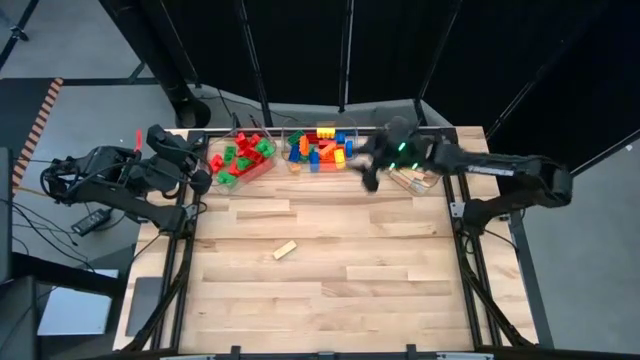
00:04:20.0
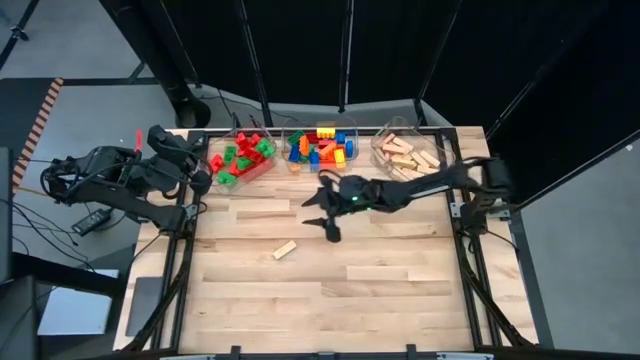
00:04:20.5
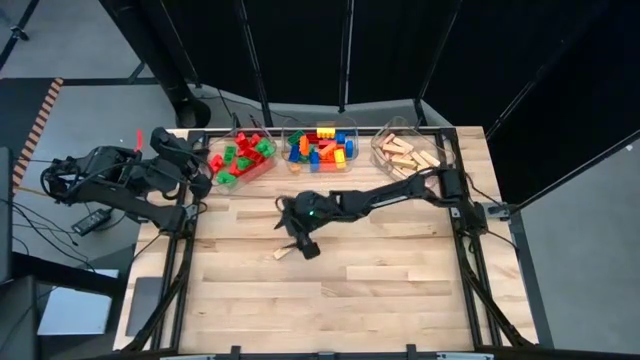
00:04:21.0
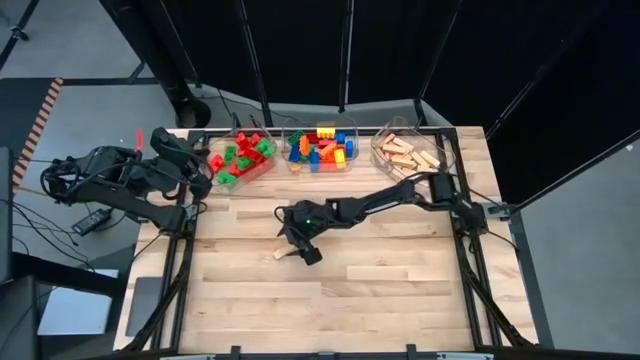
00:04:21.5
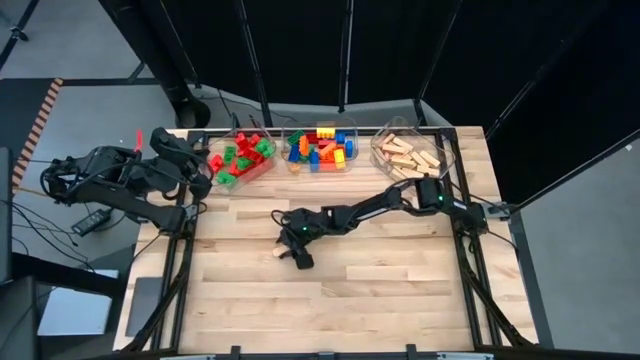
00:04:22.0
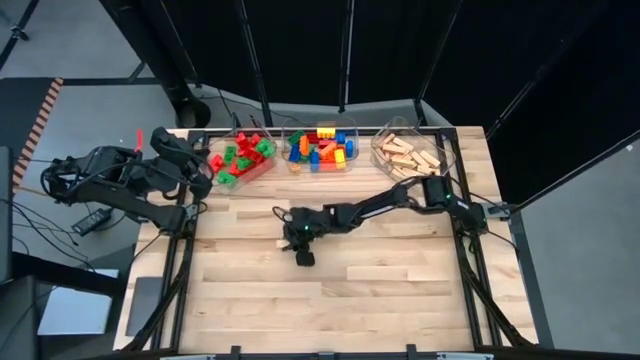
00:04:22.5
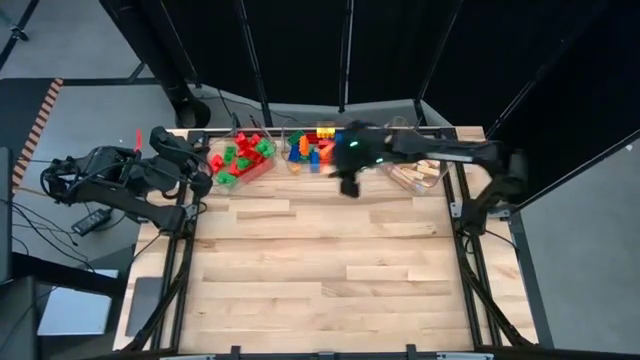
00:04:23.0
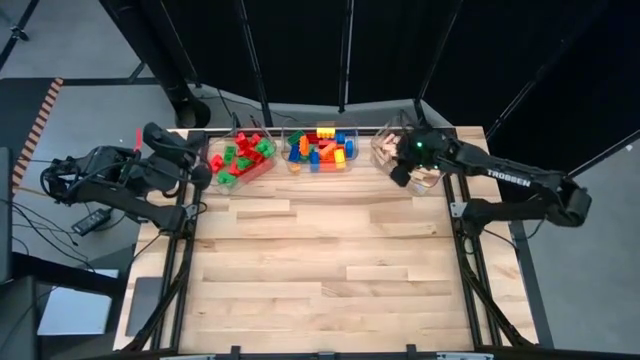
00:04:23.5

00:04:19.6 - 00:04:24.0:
Task: Sort blocks by size
Put the brown wooden block into the right transparent bin

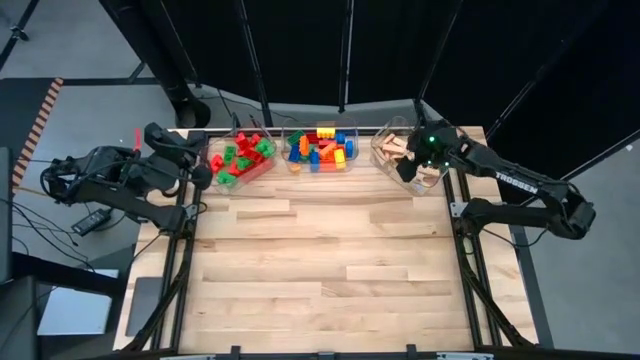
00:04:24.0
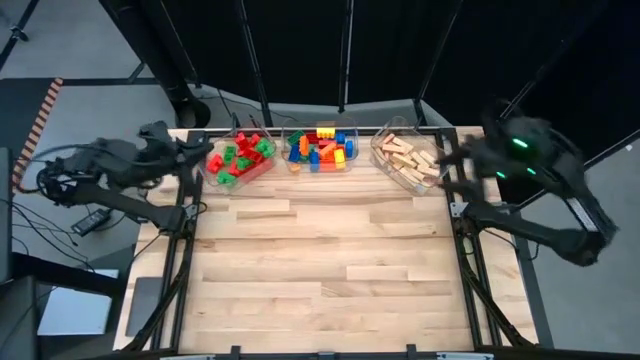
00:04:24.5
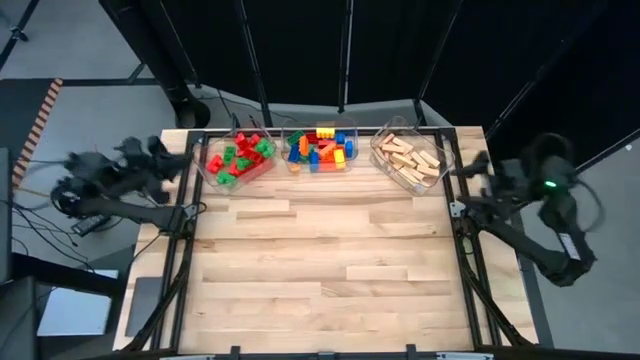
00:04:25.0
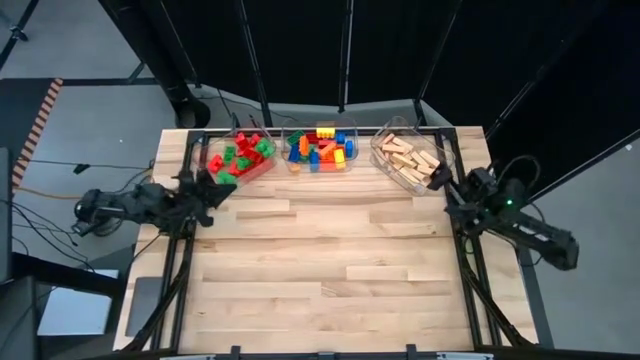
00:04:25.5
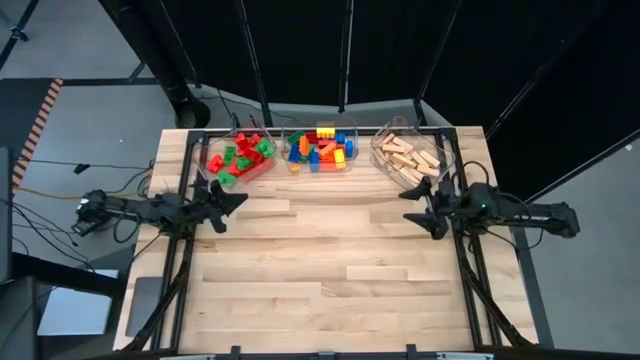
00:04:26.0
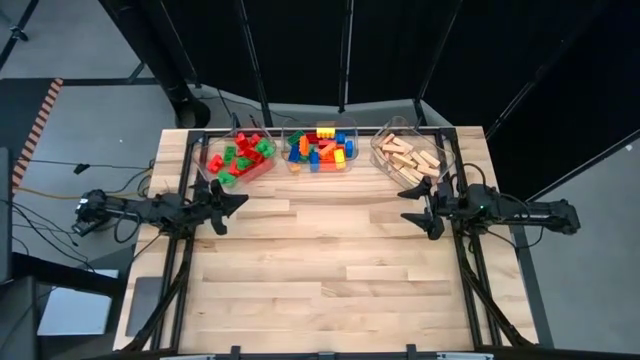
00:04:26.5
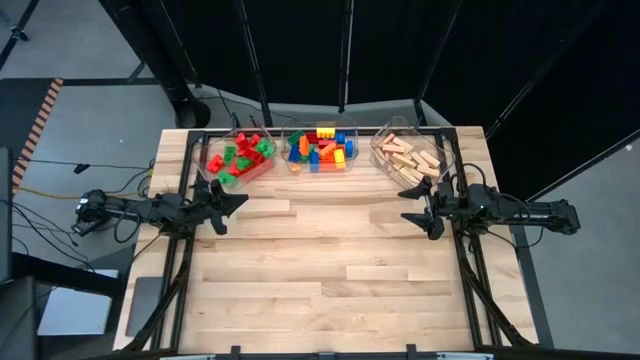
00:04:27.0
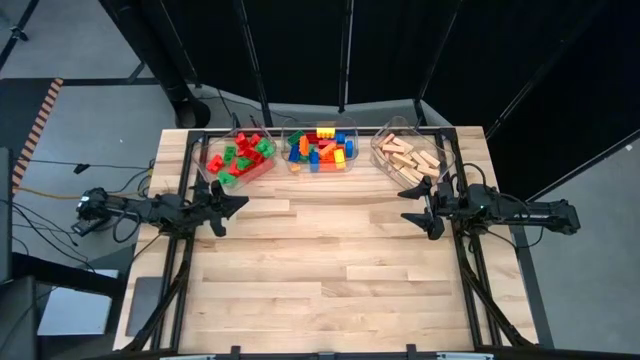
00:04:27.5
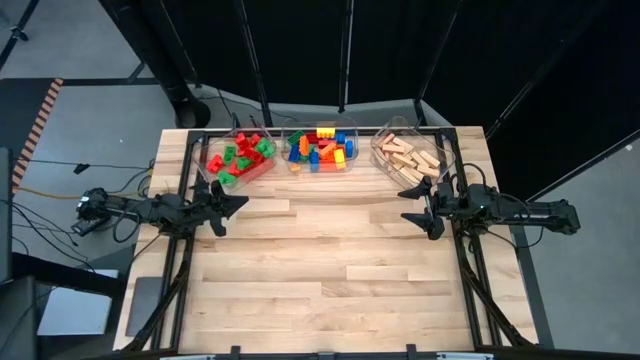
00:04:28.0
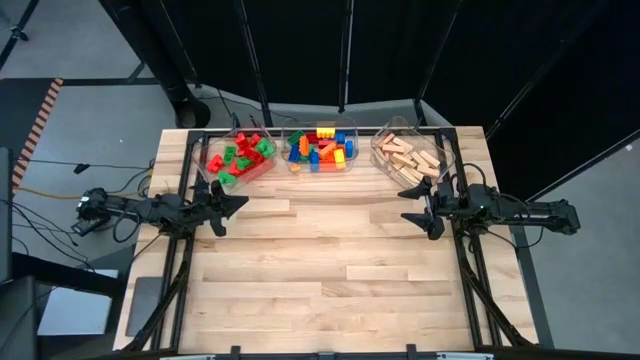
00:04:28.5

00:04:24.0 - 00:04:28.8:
Return to Home Position

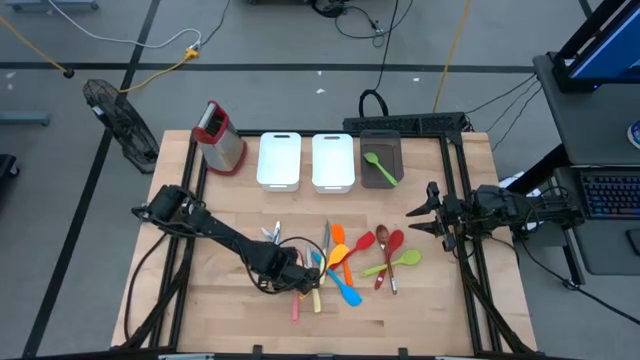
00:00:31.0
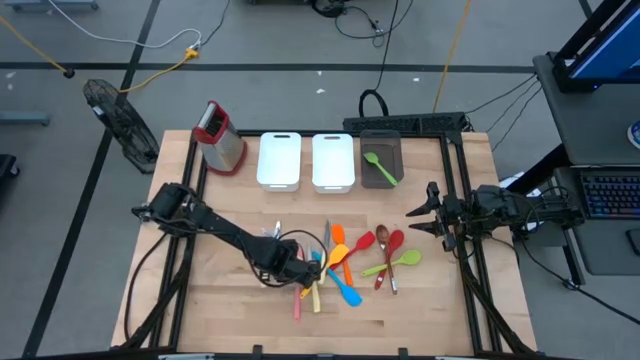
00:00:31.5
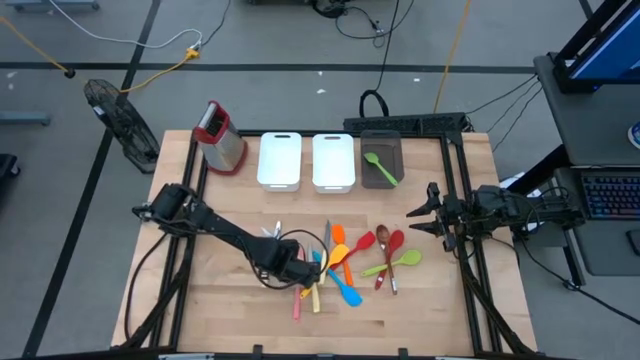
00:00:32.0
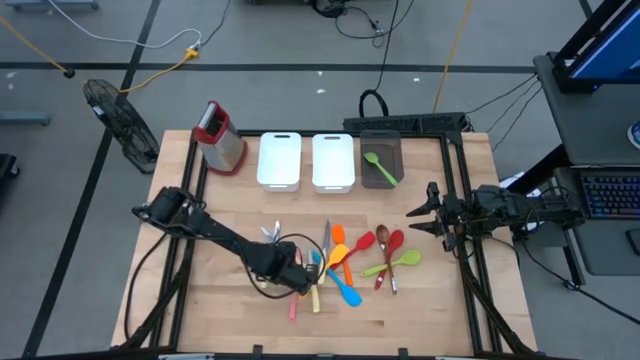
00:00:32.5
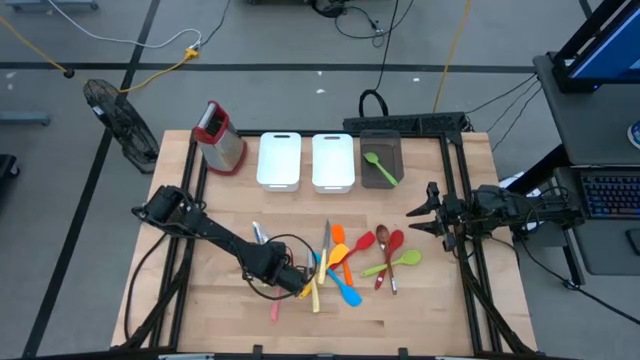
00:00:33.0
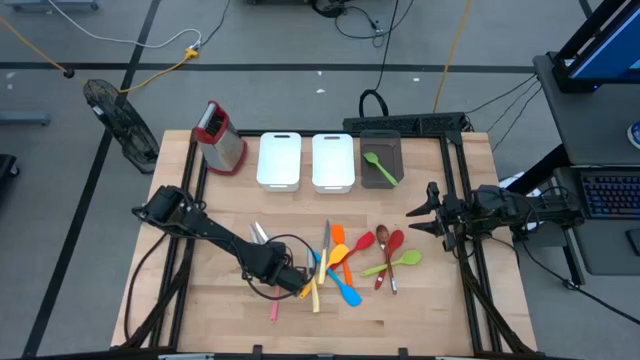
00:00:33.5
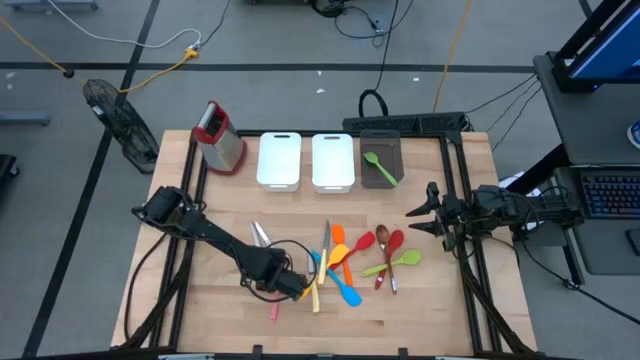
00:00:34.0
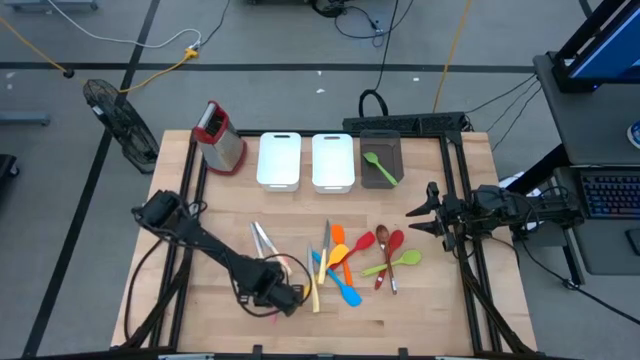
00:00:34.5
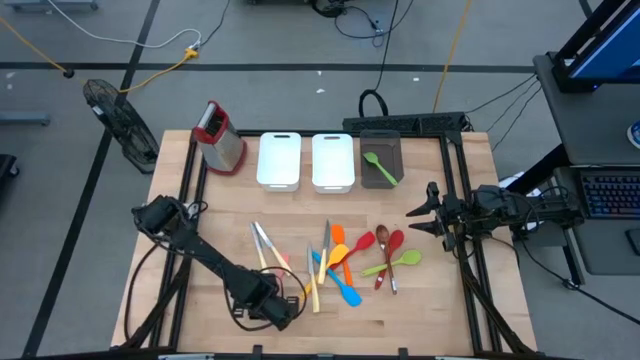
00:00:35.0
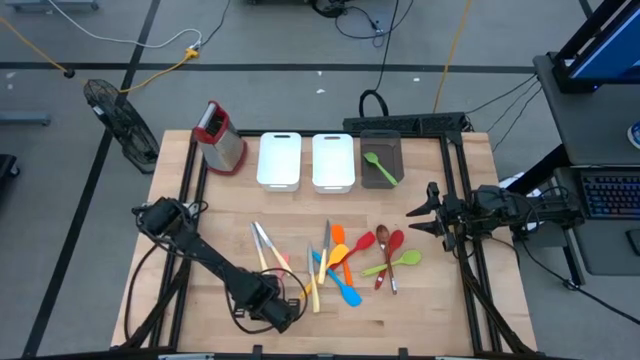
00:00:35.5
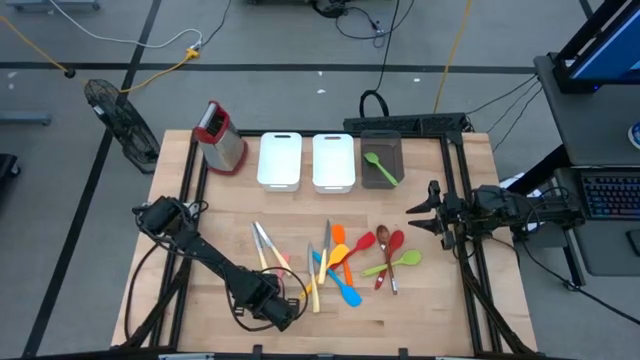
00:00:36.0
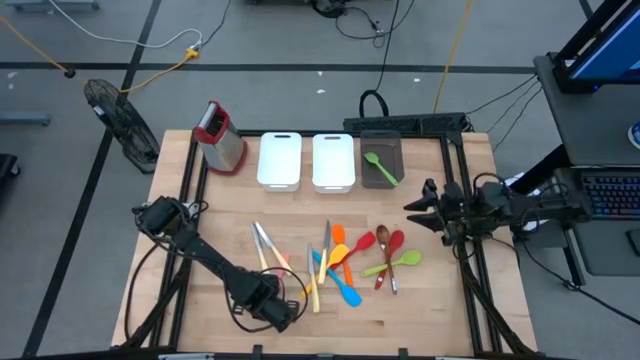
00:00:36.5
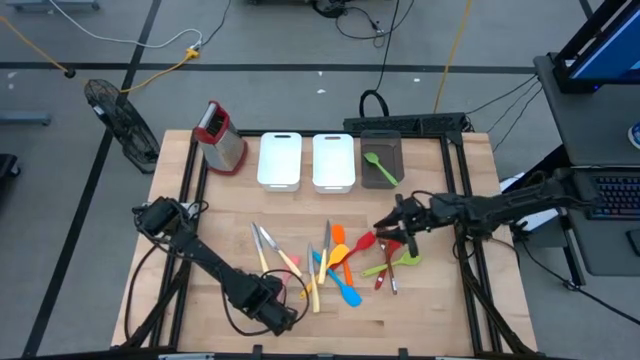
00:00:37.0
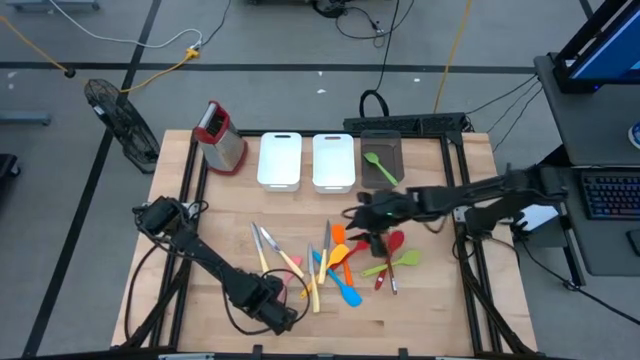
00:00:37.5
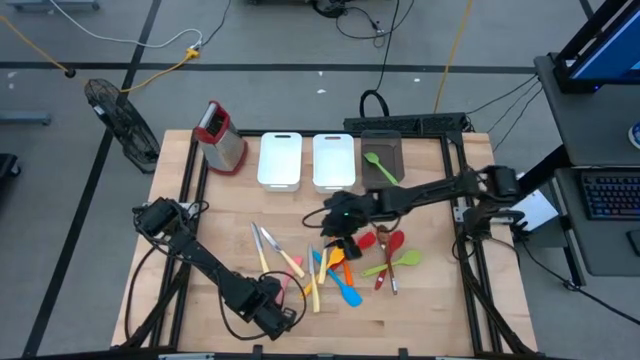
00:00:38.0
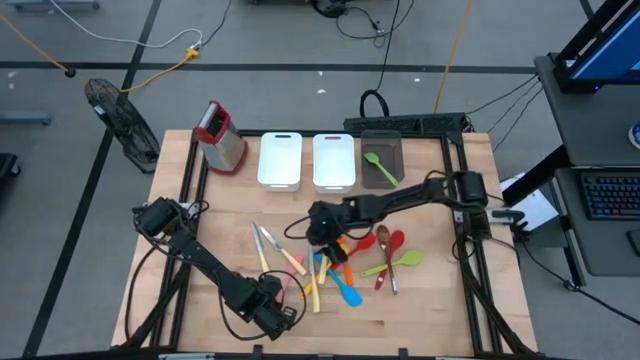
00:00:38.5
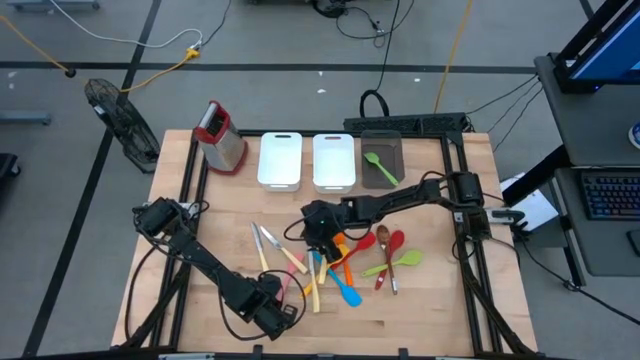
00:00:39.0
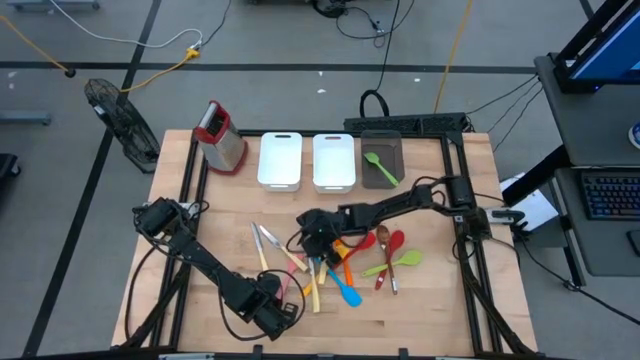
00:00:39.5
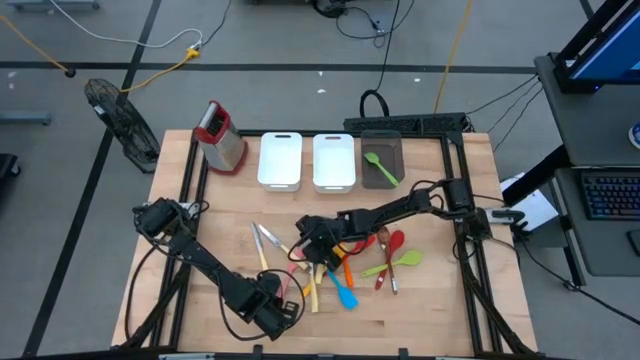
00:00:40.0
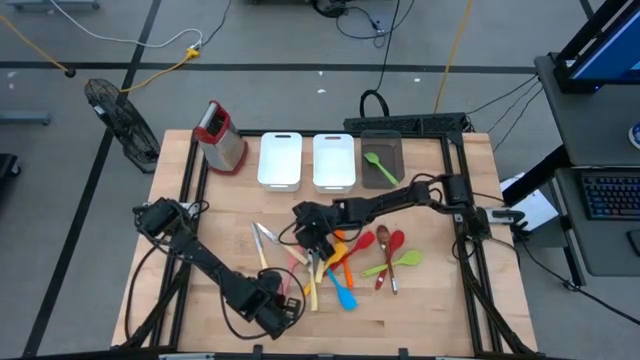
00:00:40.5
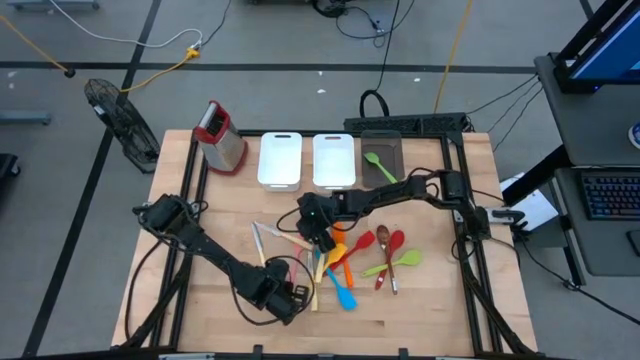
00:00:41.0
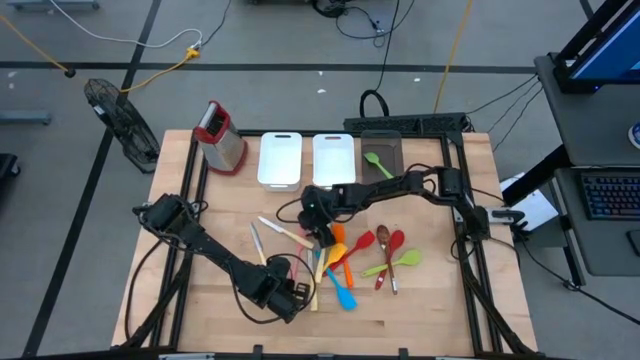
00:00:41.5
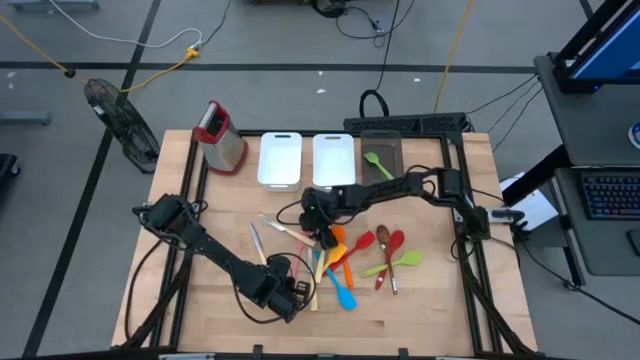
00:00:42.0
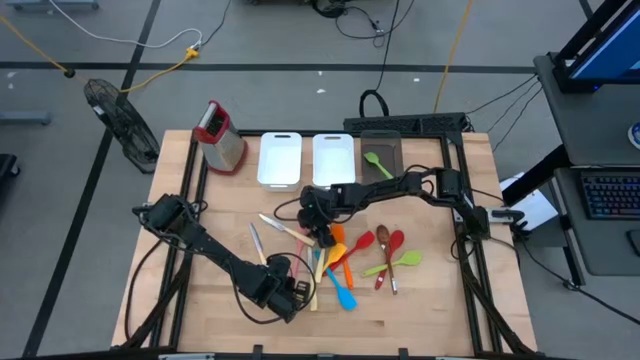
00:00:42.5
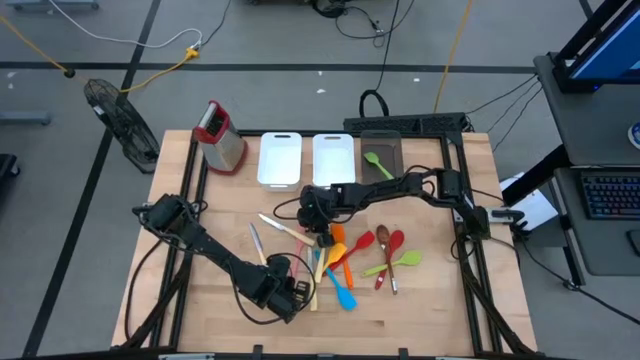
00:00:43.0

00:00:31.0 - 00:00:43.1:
Task: Pick & Place Kitchen Items
Put the pink spatula into the black bin
